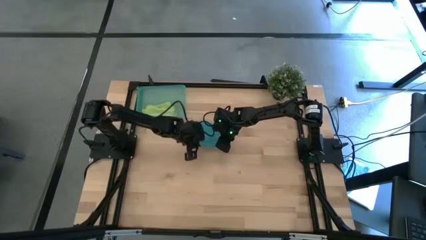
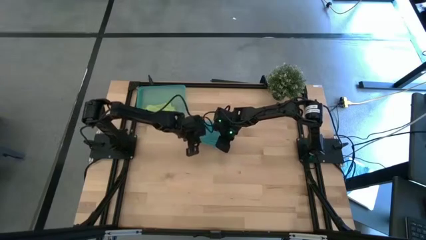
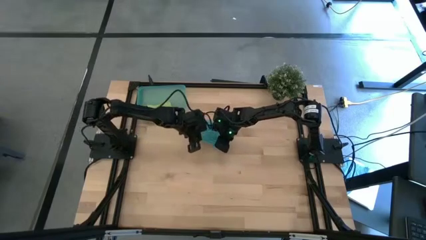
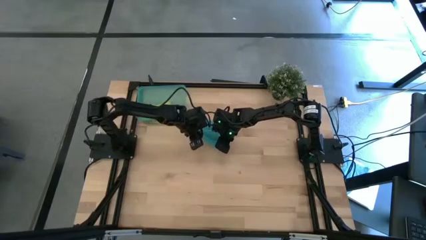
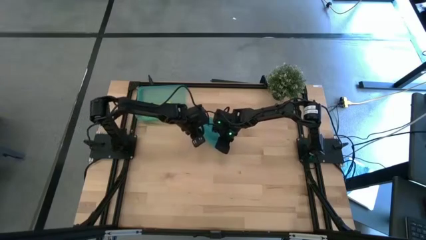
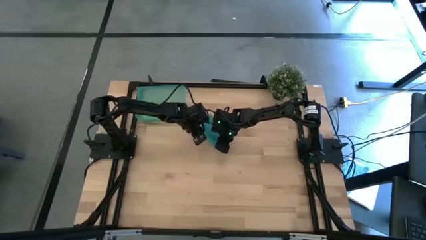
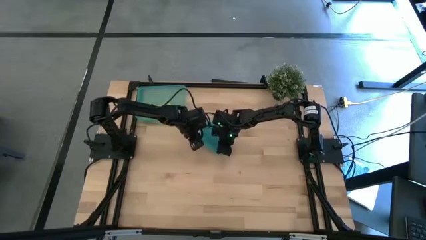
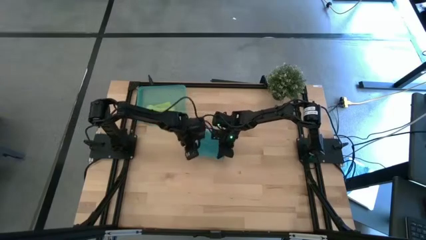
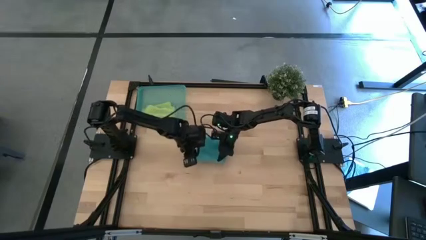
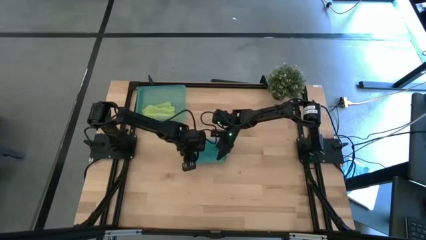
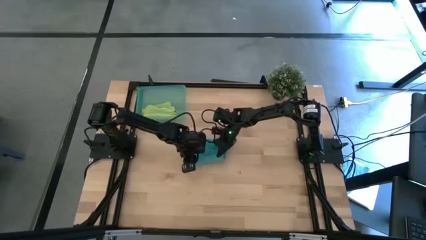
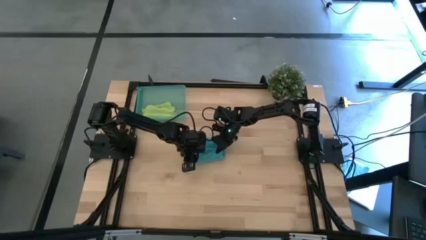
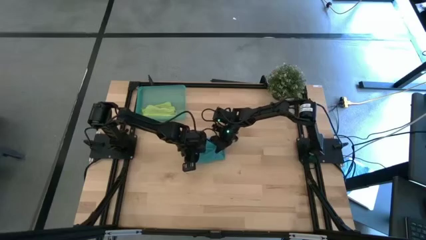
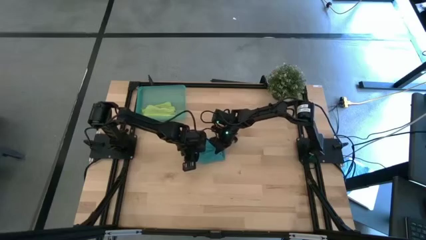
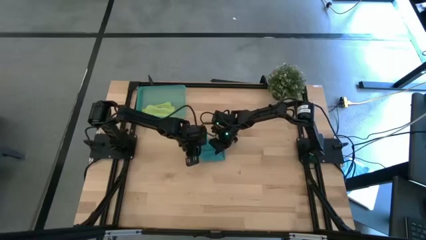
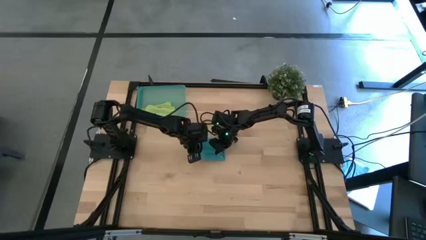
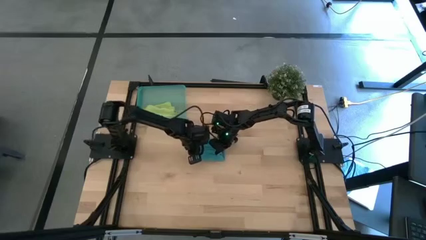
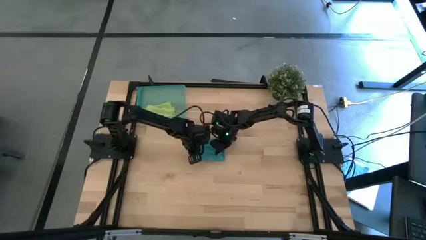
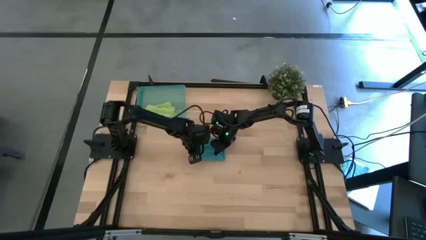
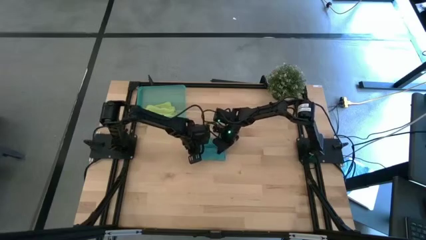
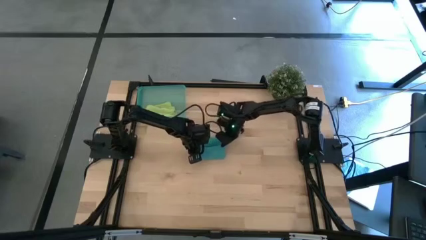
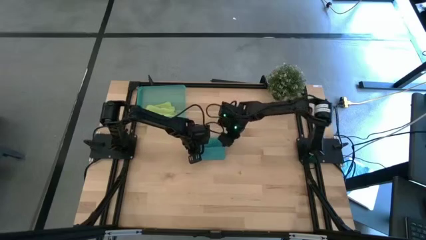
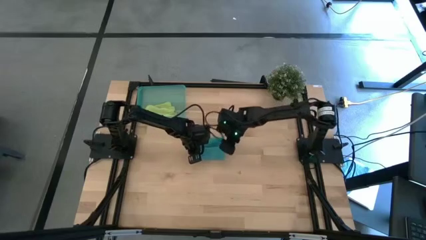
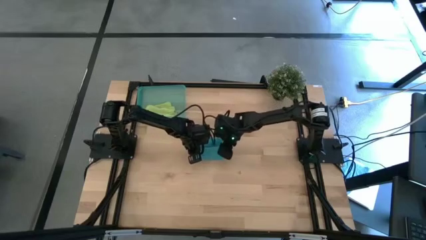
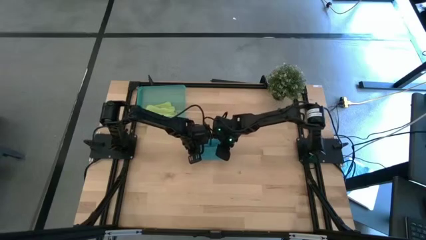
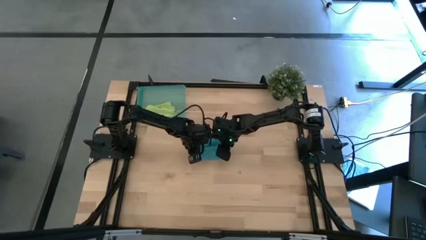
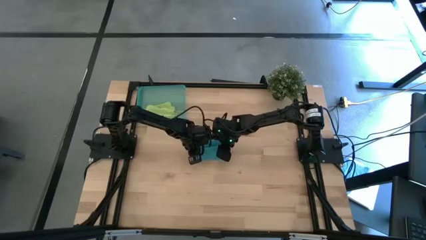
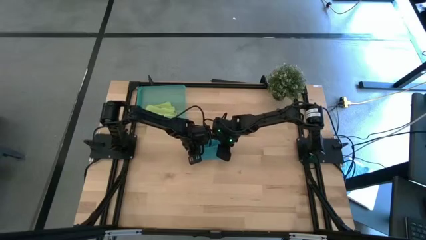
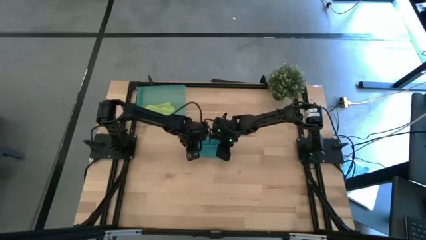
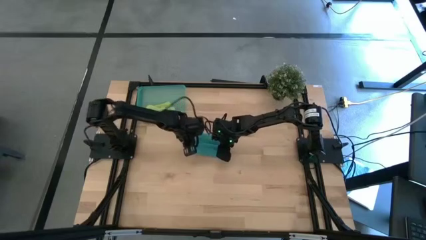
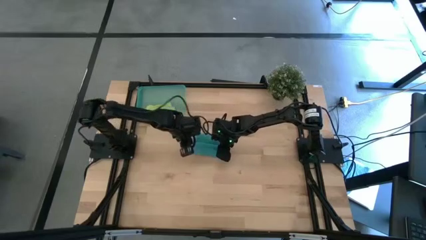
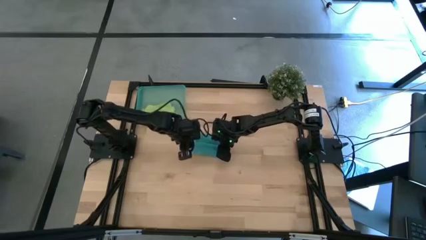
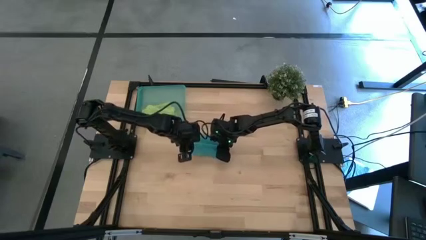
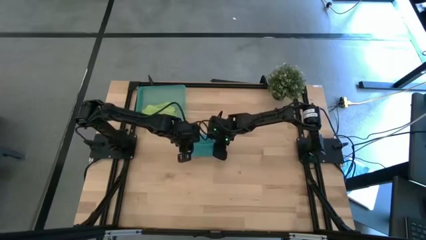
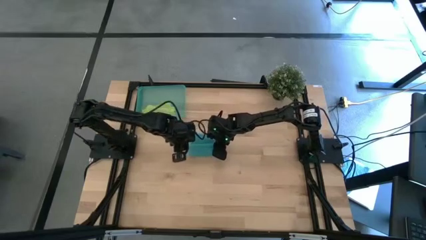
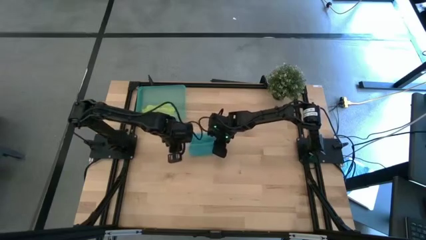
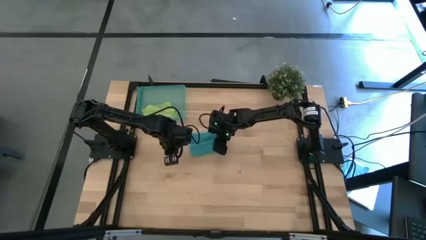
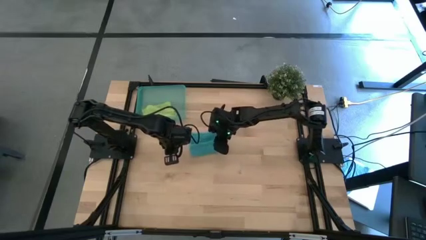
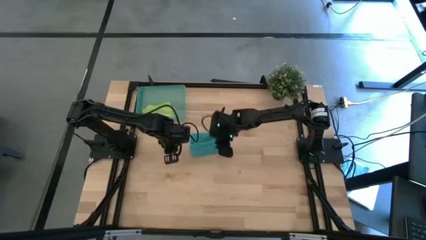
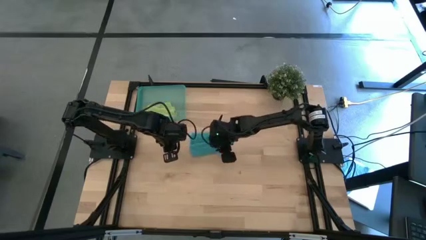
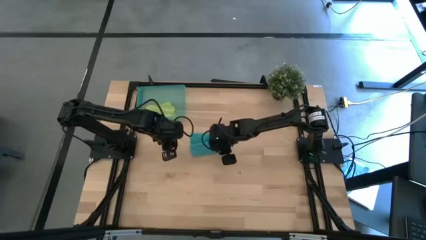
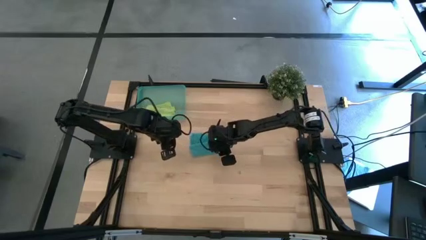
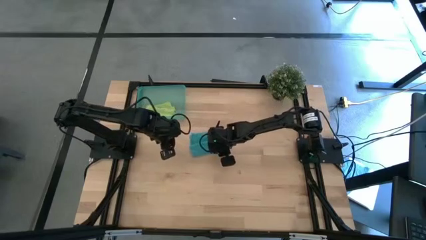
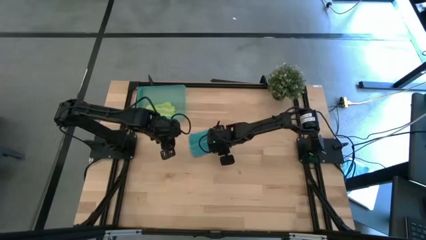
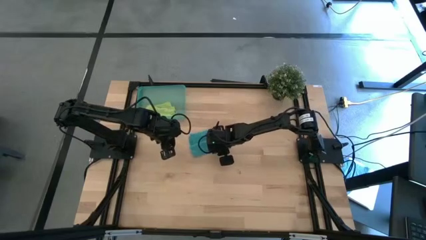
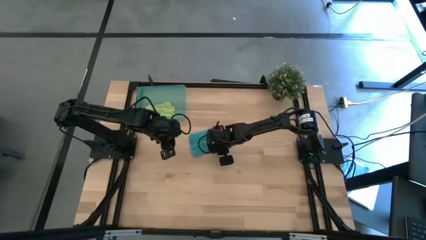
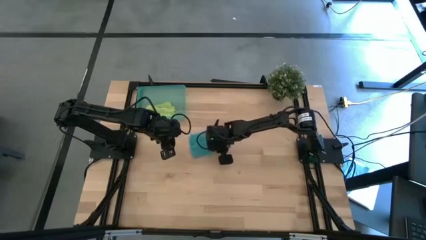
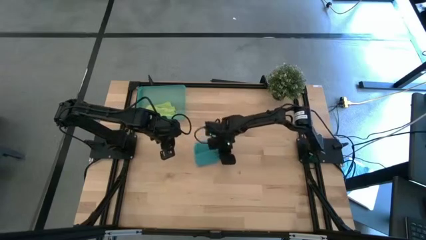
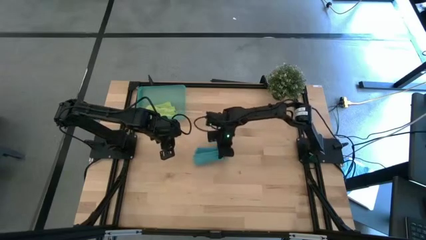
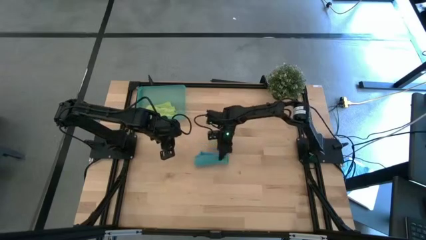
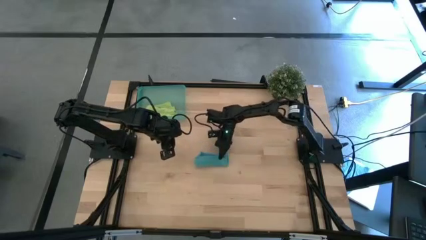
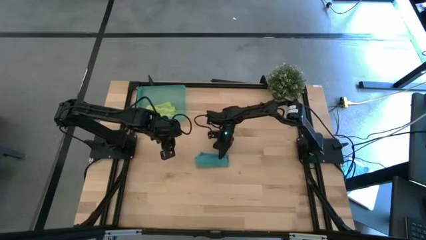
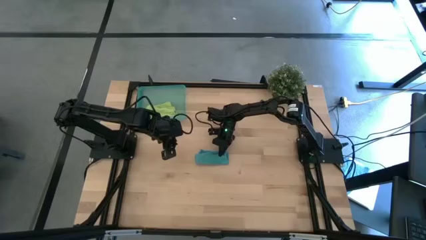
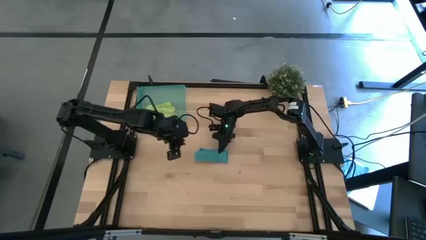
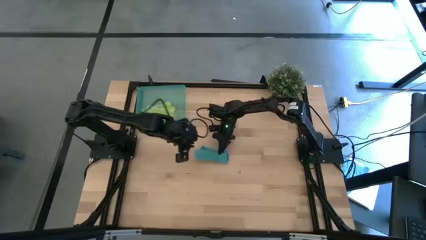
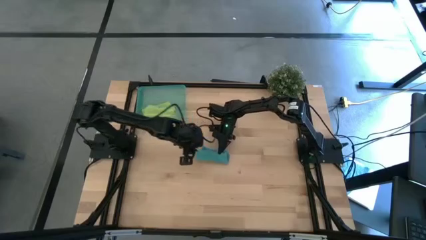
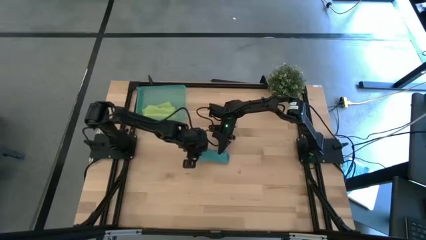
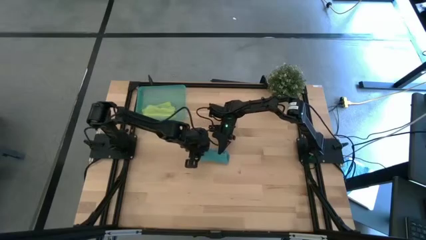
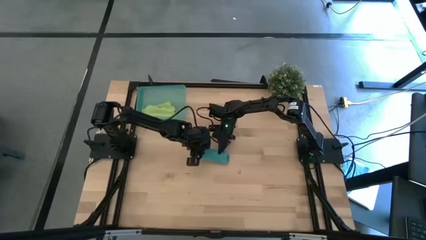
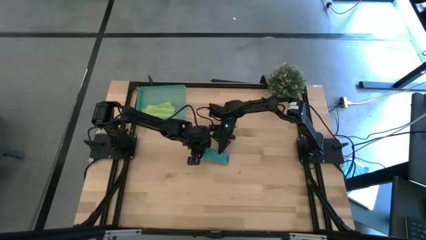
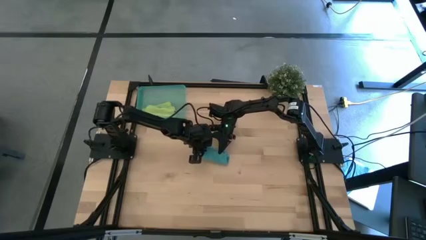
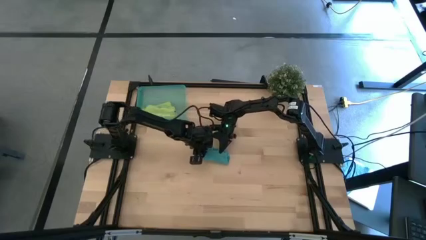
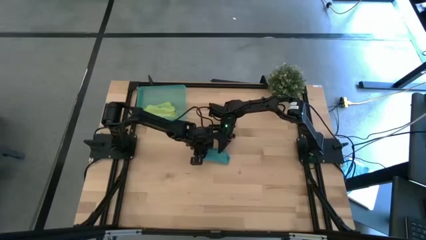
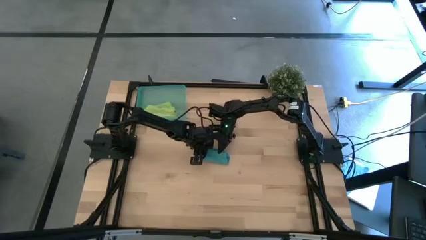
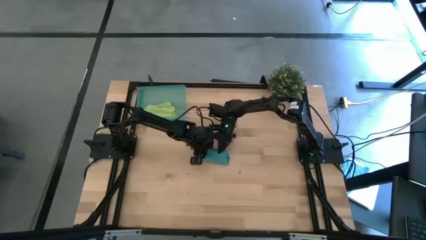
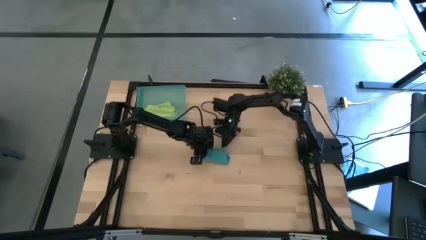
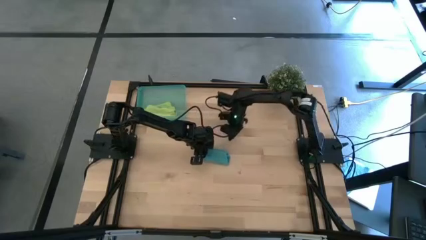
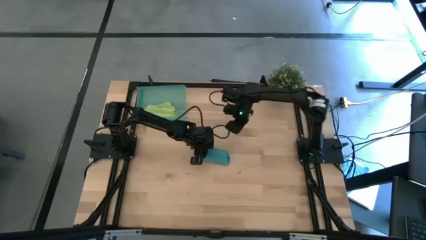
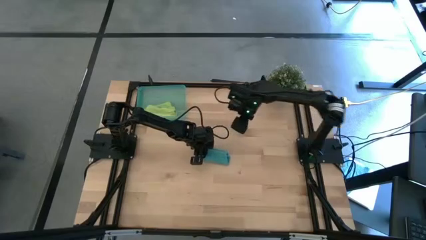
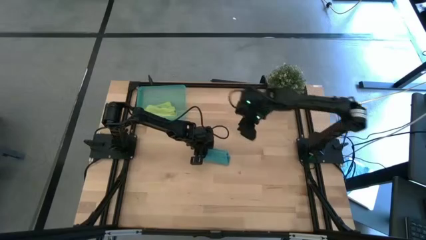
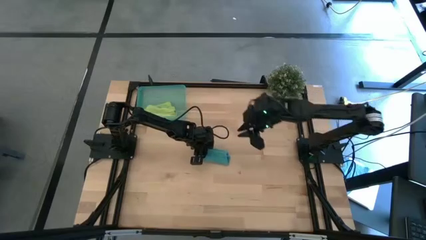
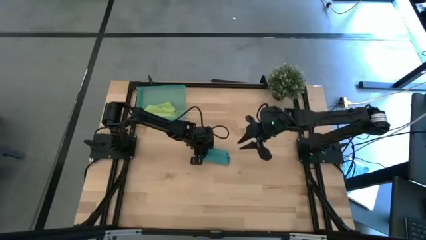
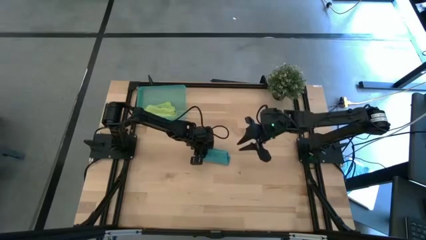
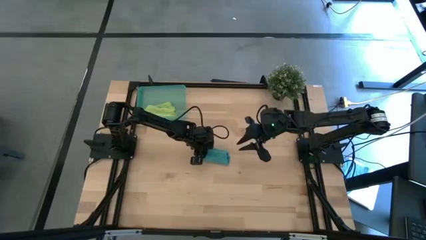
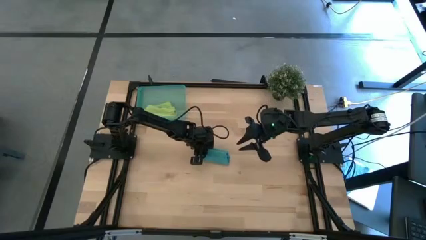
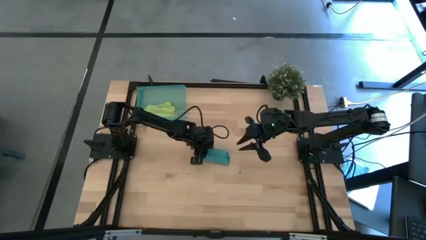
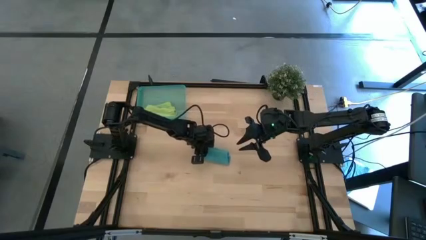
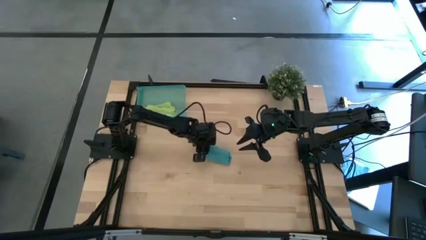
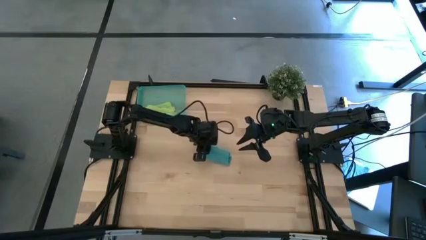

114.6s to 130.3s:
Task: Roll microfiber towels into tight, uniform cylinder then place into a basket
Roll the blue microfiber cloth

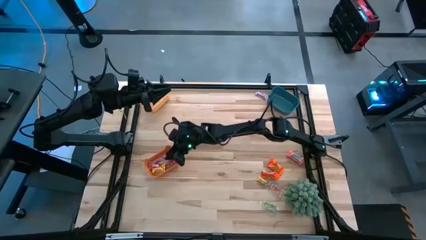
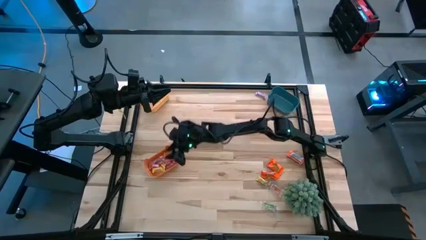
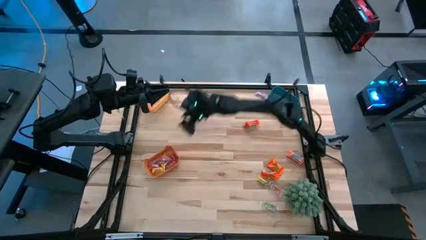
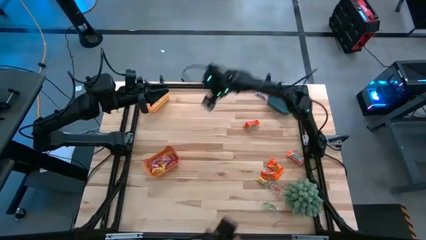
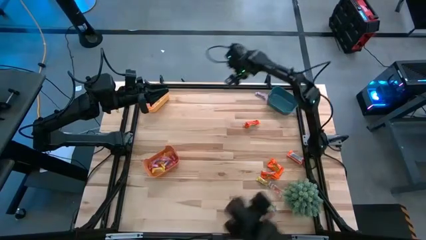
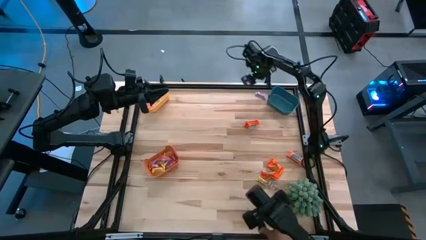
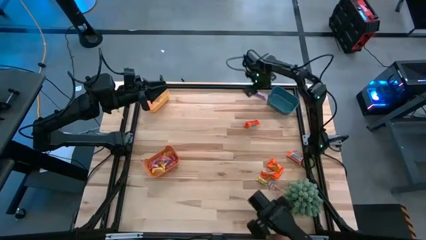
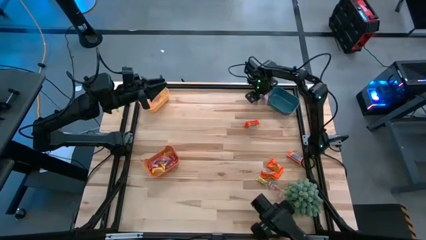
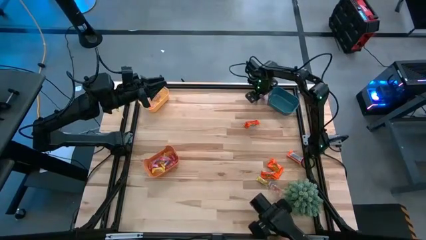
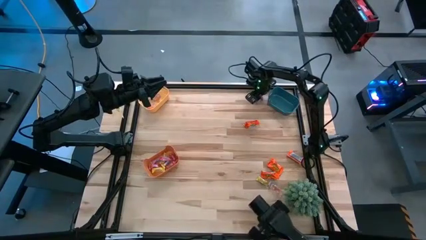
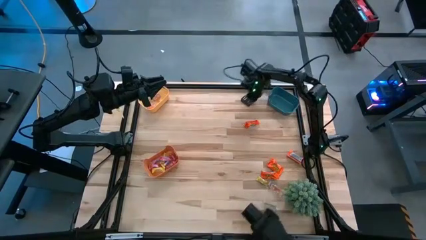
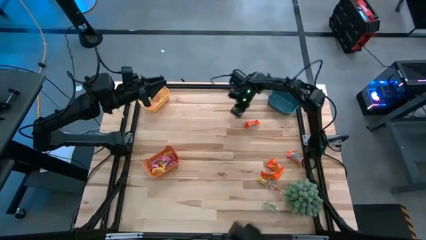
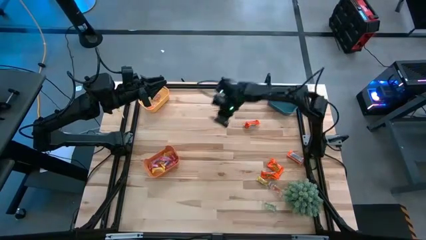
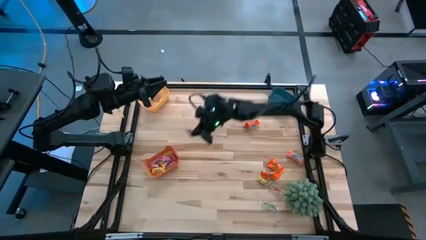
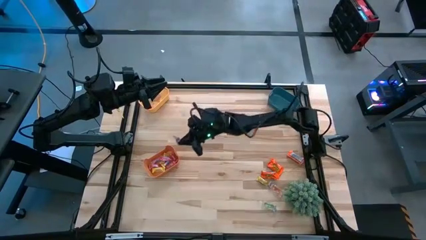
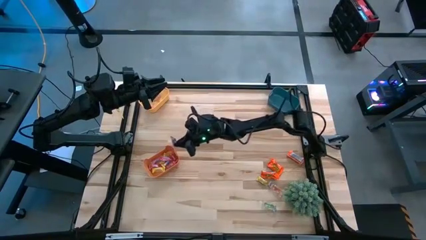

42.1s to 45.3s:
Task: Sort candy
Put the pink candy into the orange bin
